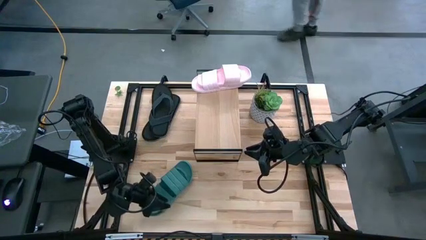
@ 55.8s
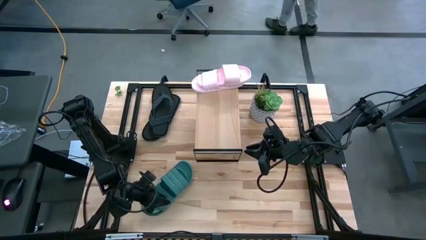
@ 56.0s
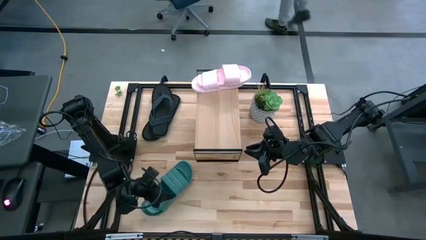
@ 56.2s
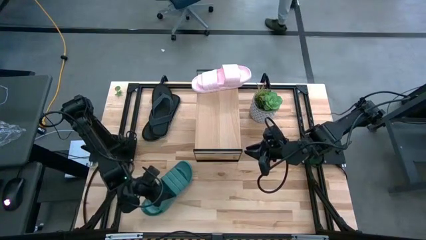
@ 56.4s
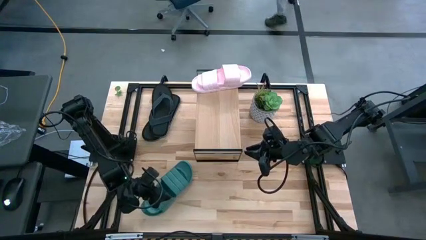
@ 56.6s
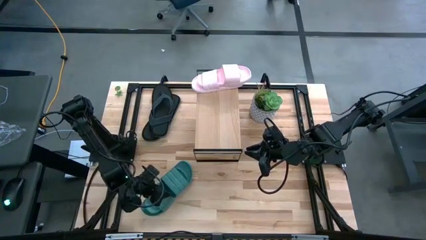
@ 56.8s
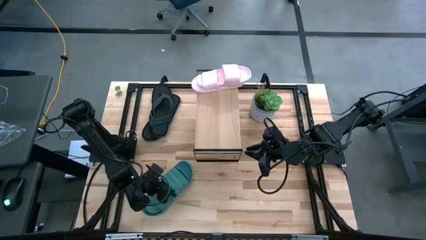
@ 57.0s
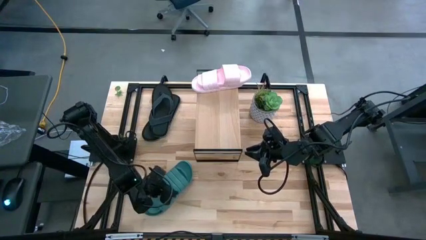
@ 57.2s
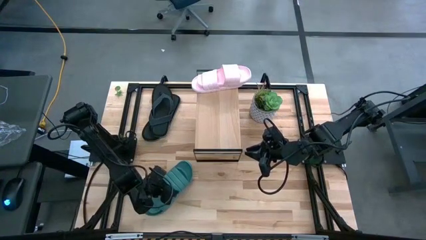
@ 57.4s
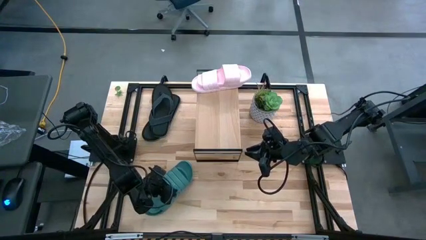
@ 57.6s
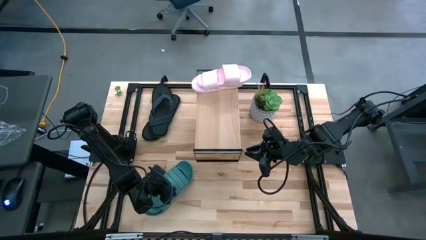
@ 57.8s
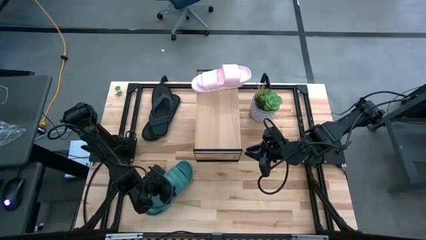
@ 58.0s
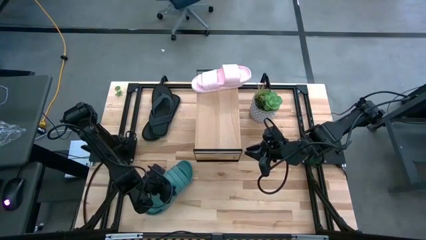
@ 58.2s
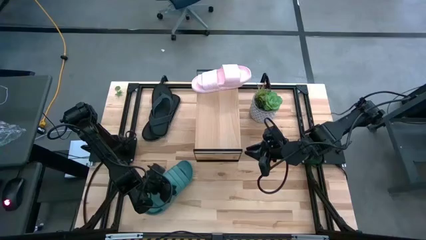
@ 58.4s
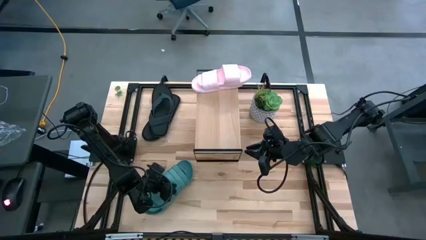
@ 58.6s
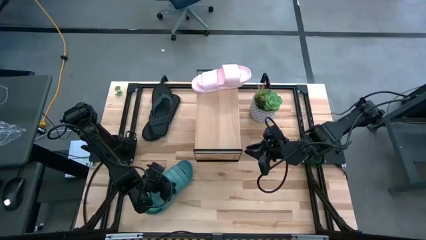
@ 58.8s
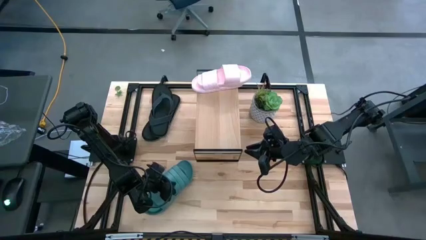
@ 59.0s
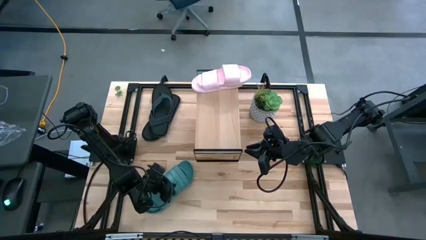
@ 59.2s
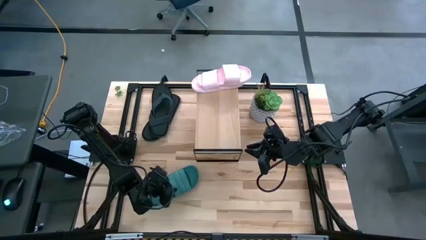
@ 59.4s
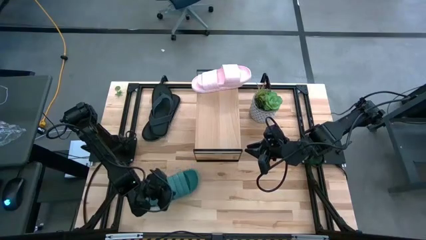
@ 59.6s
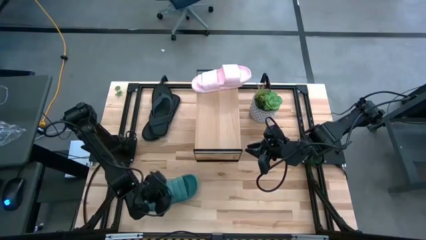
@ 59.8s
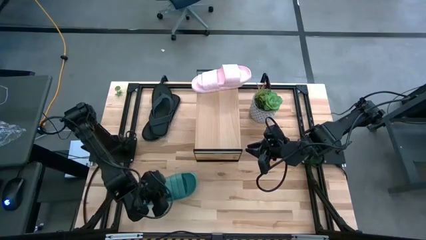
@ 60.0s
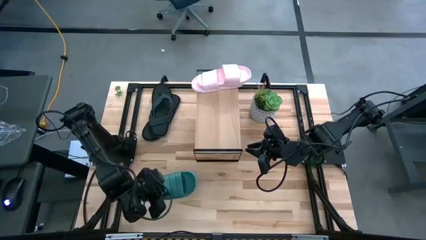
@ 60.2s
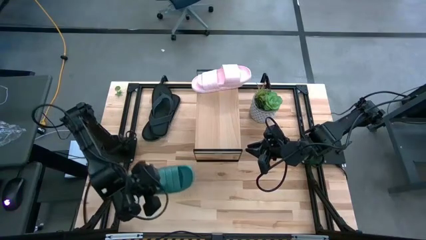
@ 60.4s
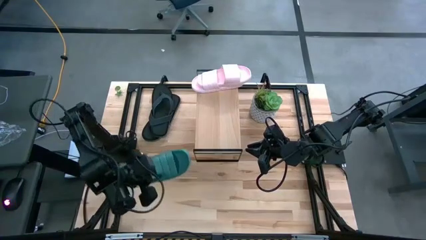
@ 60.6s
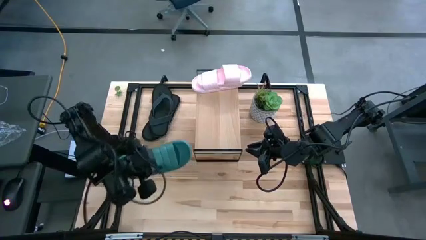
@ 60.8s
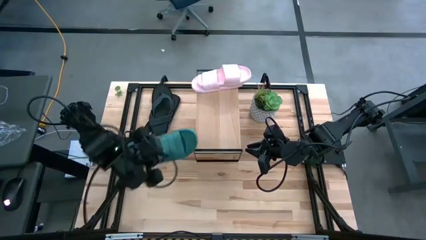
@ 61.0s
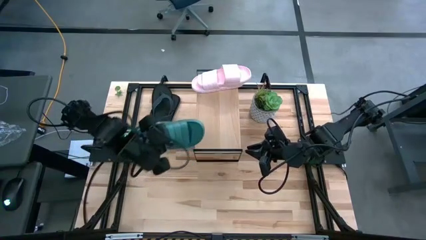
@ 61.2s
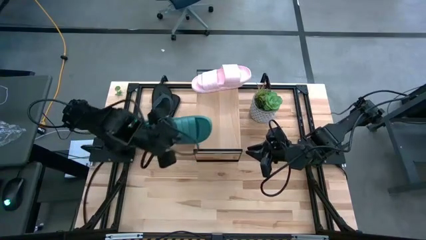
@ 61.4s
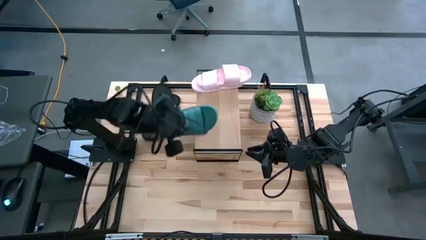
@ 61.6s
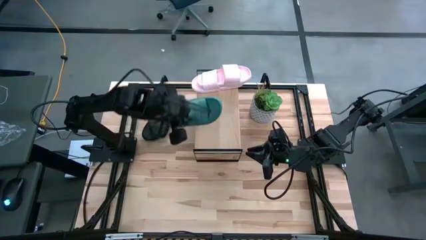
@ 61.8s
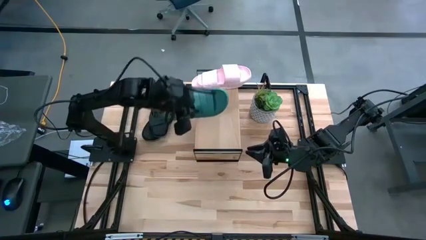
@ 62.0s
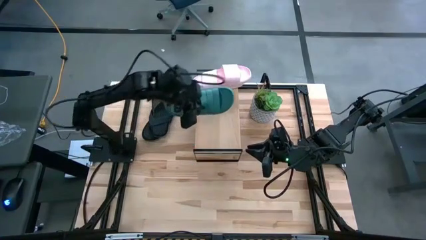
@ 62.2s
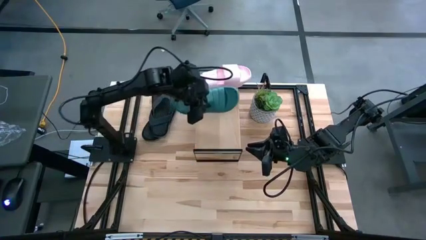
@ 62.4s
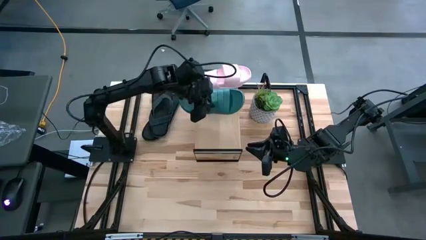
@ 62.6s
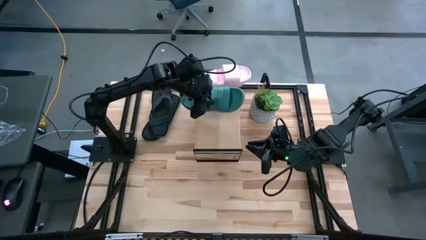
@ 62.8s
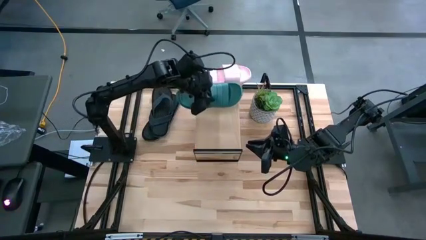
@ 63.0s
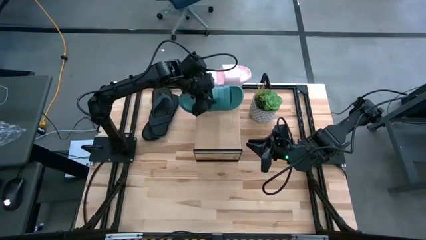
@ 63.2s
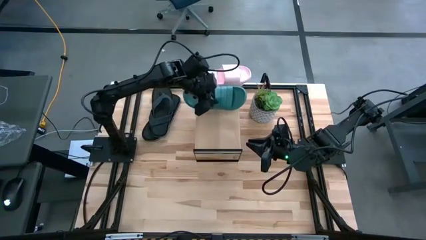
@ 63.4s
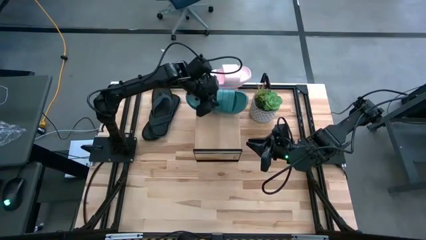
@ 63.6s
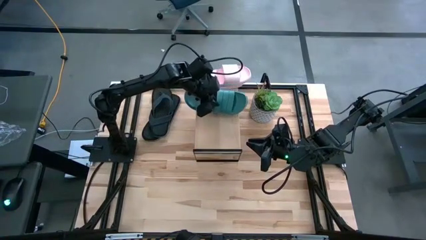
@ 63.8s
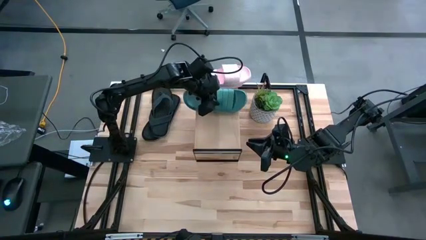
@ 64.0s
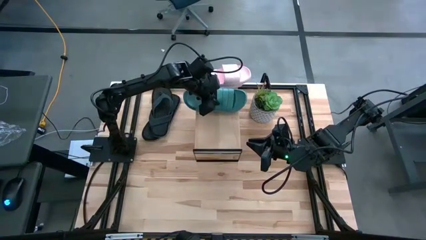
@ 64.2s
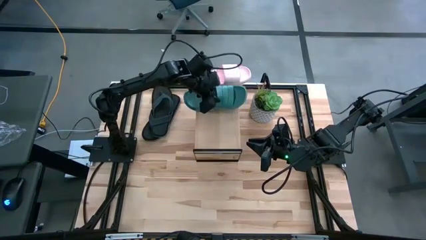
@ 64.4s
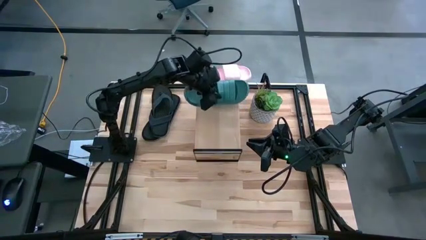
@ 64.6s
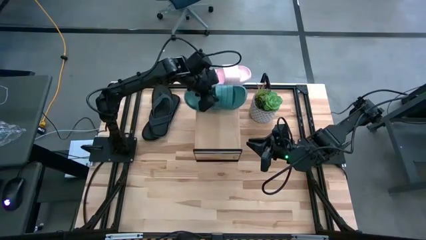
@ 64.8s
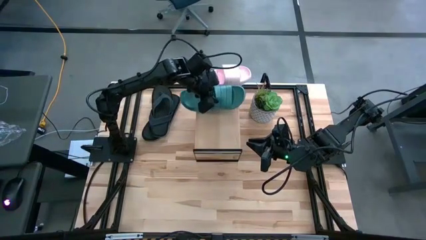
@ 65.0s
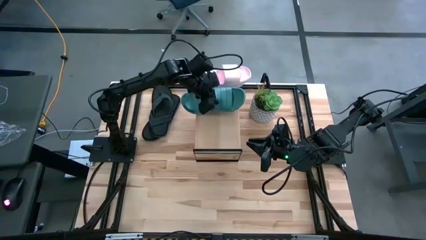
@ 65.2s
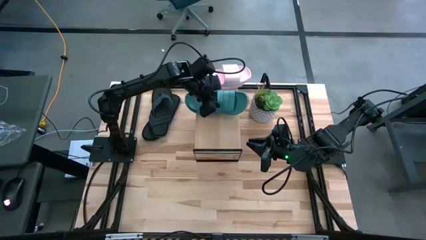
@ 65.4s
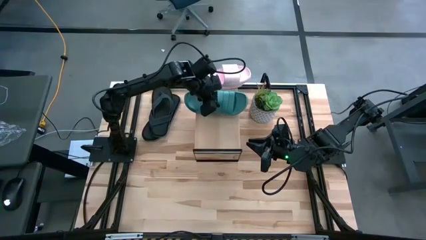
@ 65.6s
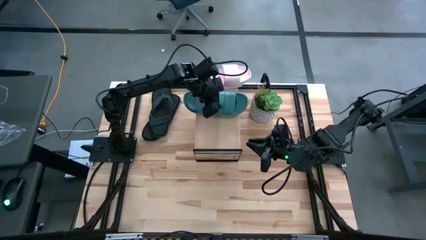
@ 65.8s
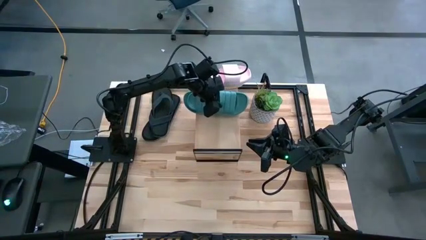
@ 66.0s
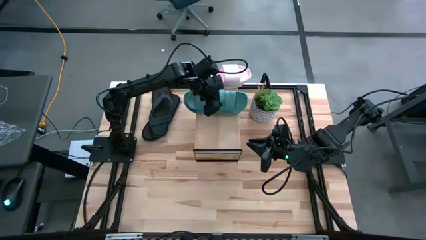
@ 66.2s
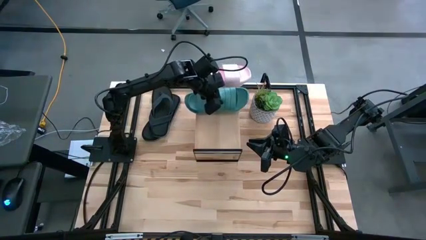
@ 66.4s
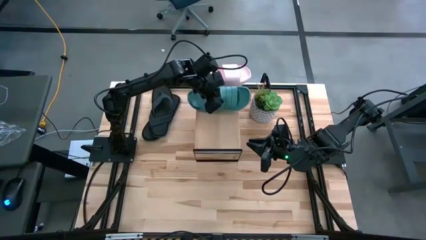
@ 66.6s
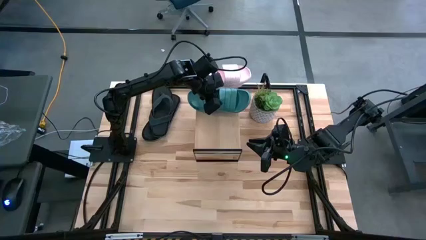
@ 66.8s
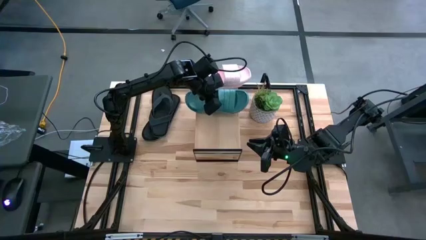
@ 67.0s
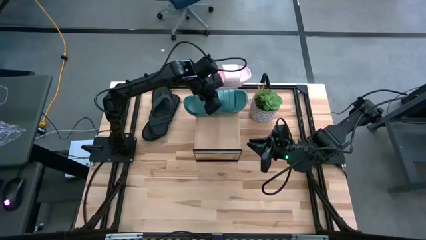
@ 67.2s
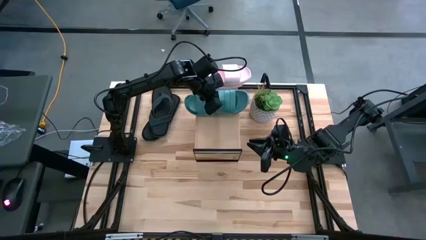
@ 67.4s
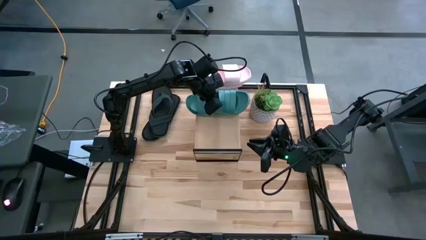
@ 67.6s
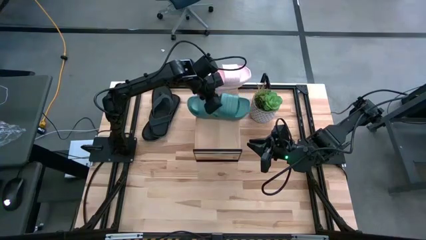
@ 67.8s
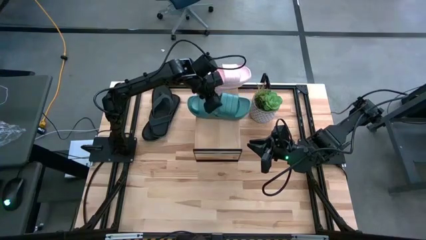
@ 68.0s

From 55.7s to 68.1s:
Task: Pick and place slippers onto the shelf
Put the green pair of slippers on the shelf
